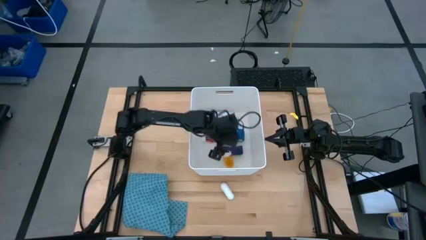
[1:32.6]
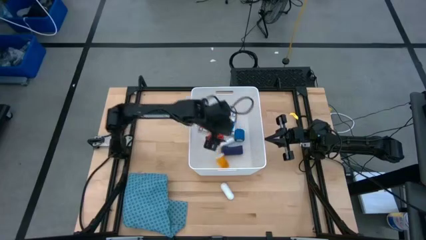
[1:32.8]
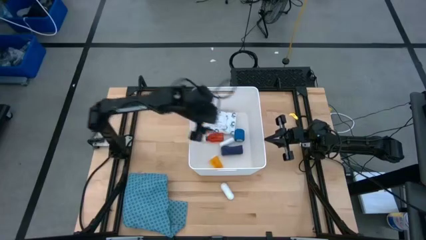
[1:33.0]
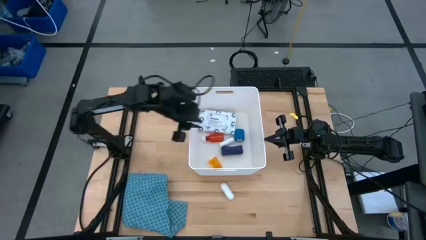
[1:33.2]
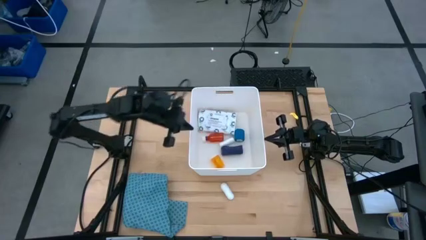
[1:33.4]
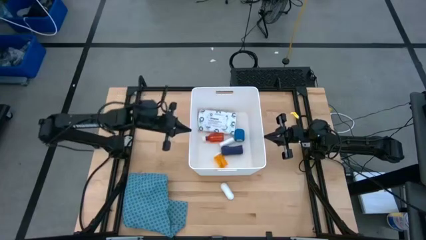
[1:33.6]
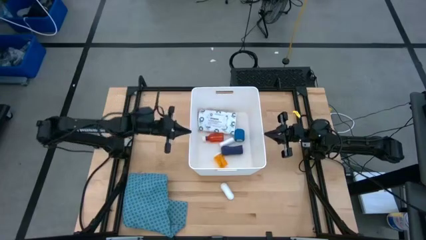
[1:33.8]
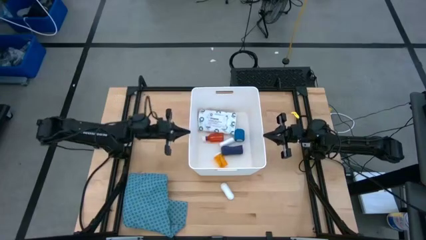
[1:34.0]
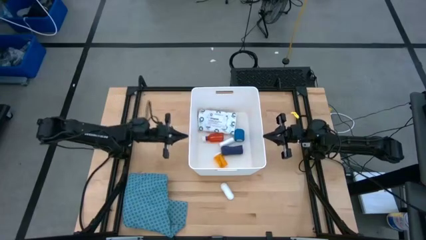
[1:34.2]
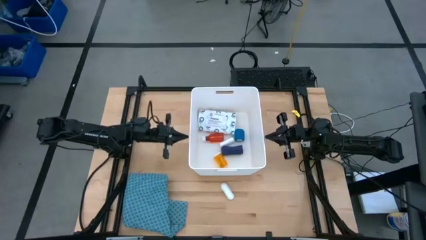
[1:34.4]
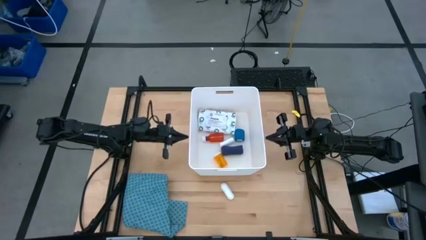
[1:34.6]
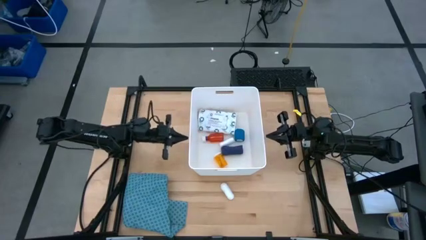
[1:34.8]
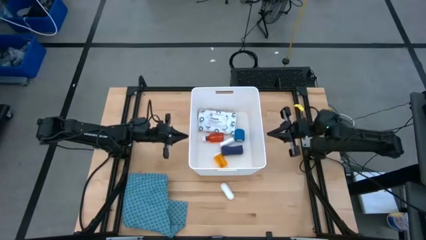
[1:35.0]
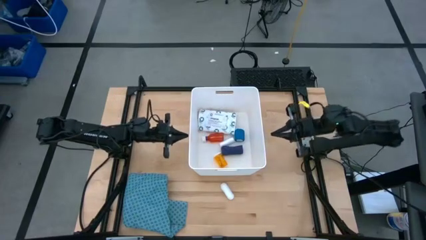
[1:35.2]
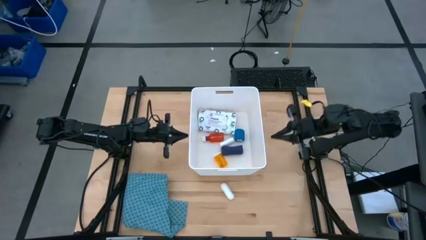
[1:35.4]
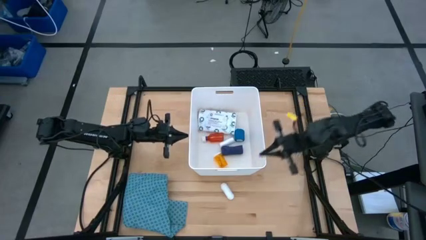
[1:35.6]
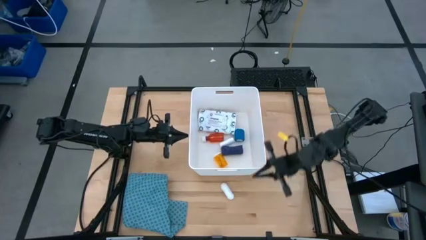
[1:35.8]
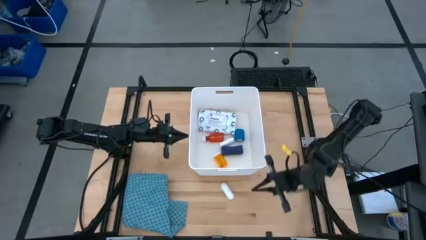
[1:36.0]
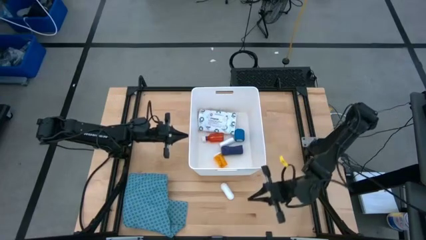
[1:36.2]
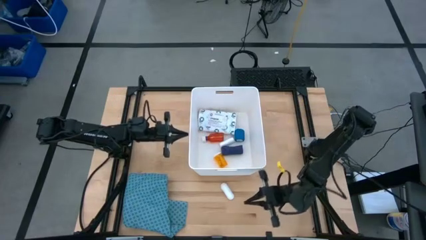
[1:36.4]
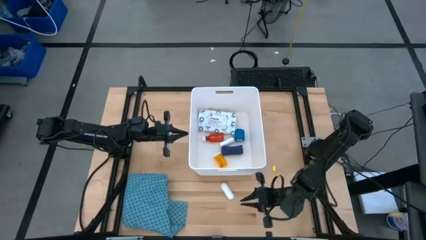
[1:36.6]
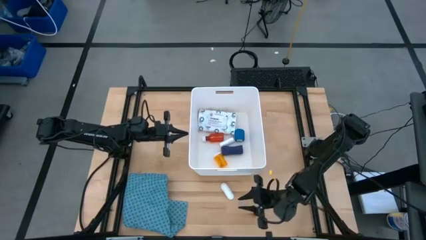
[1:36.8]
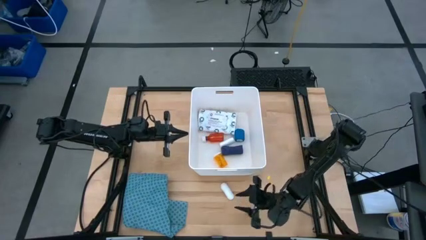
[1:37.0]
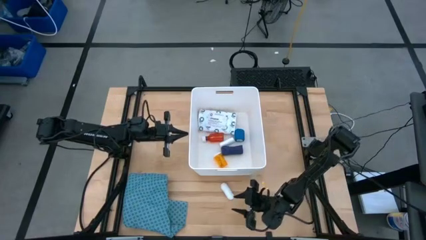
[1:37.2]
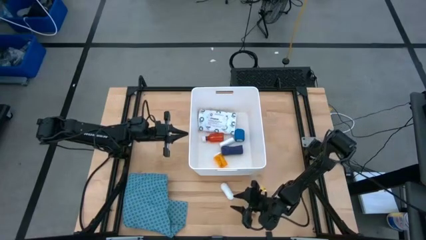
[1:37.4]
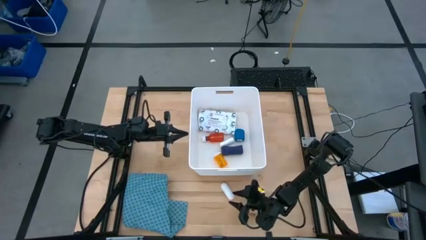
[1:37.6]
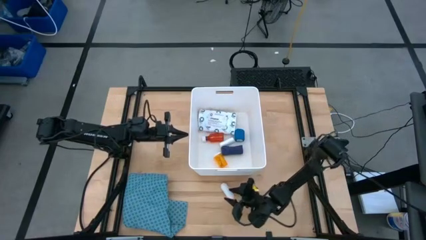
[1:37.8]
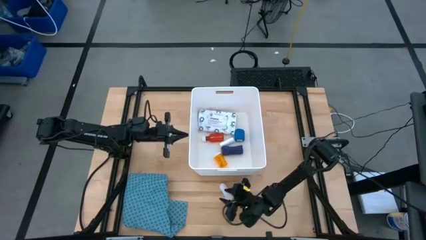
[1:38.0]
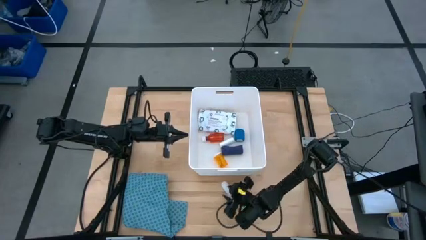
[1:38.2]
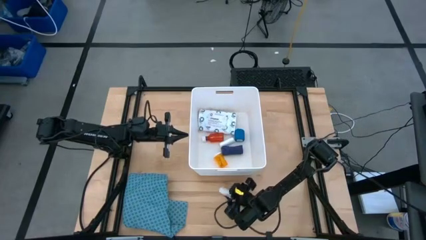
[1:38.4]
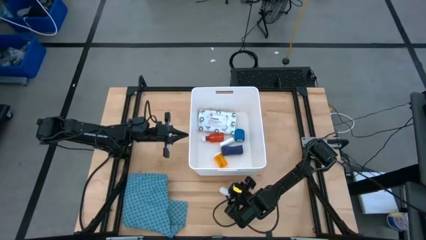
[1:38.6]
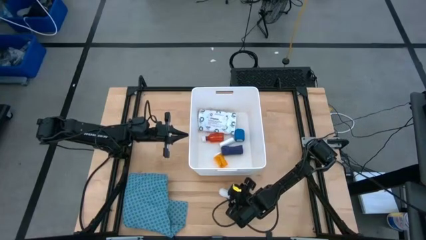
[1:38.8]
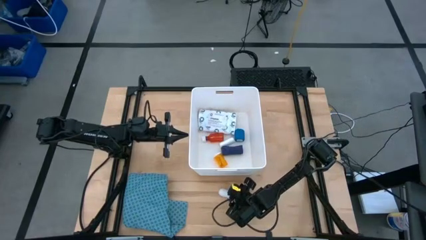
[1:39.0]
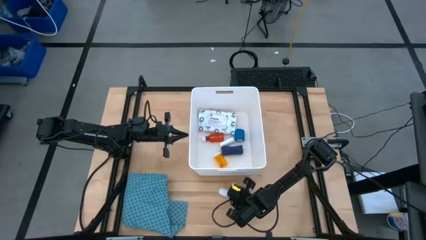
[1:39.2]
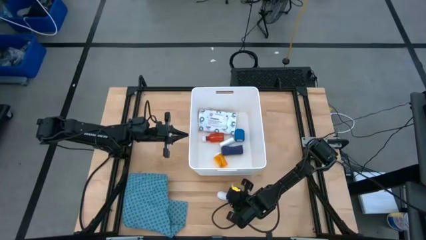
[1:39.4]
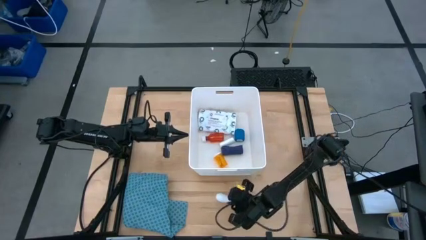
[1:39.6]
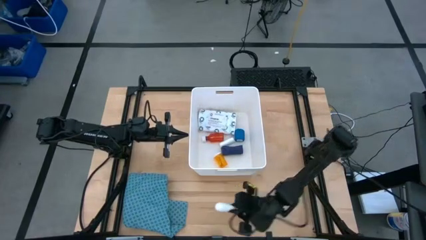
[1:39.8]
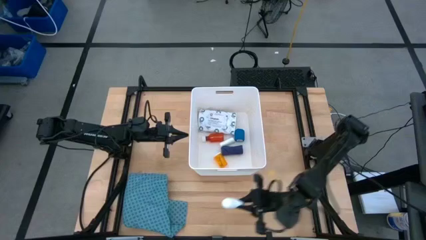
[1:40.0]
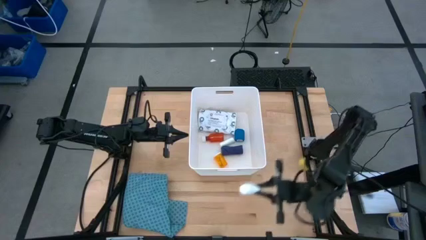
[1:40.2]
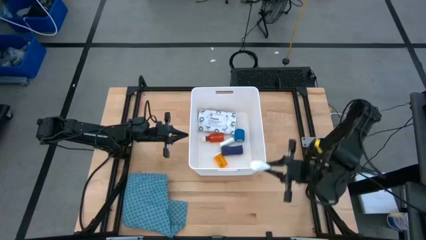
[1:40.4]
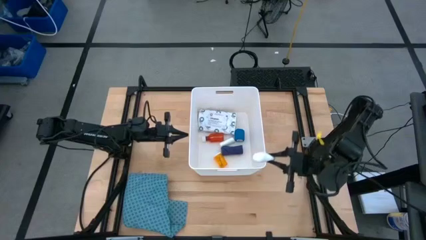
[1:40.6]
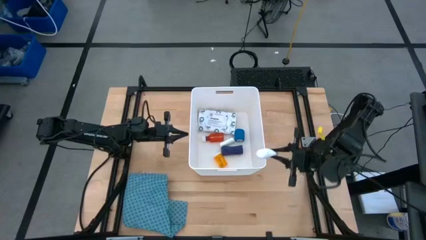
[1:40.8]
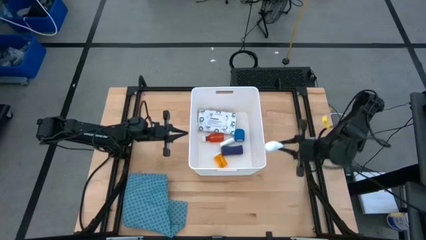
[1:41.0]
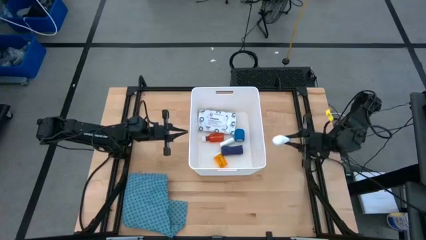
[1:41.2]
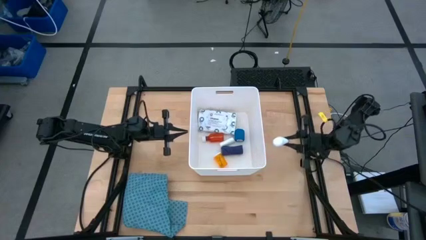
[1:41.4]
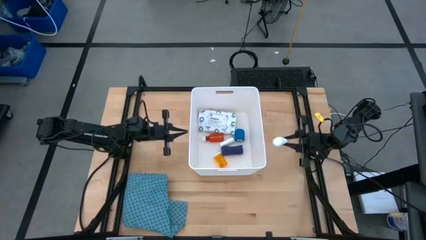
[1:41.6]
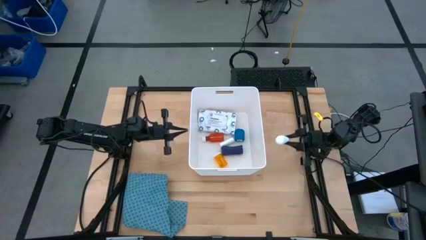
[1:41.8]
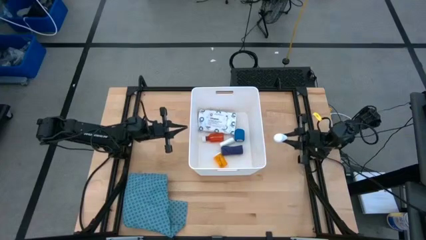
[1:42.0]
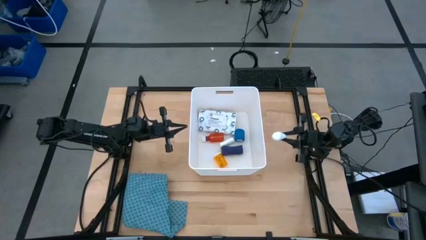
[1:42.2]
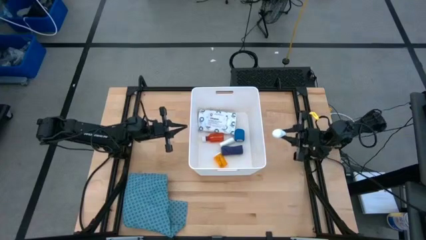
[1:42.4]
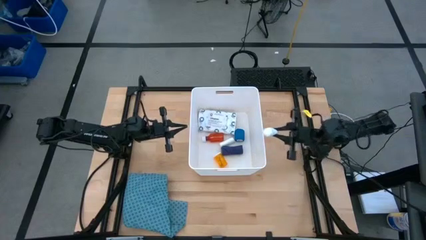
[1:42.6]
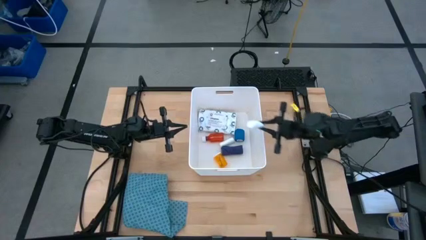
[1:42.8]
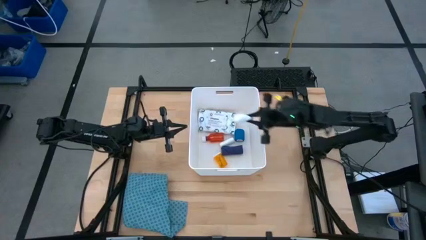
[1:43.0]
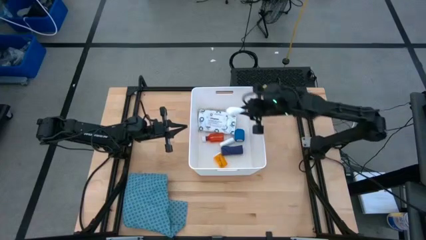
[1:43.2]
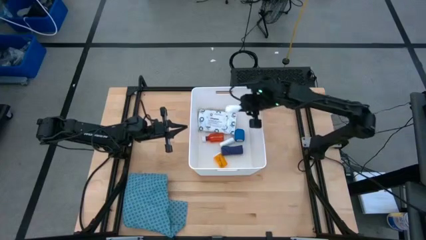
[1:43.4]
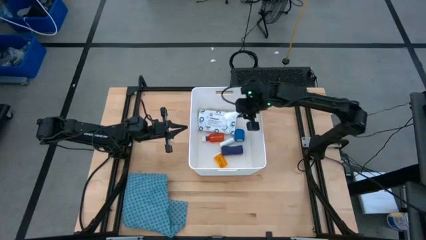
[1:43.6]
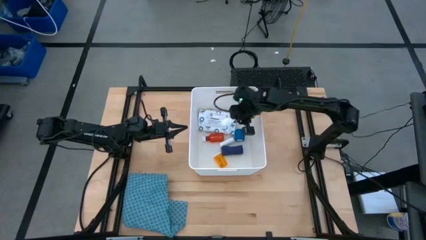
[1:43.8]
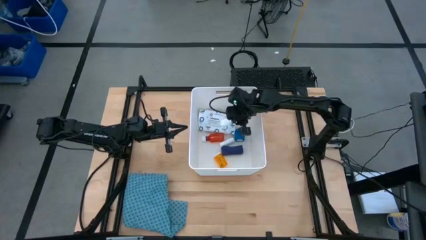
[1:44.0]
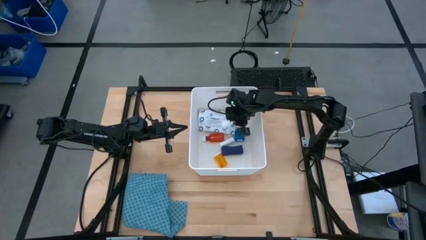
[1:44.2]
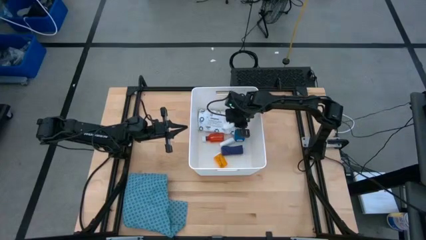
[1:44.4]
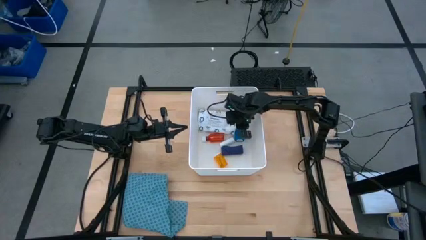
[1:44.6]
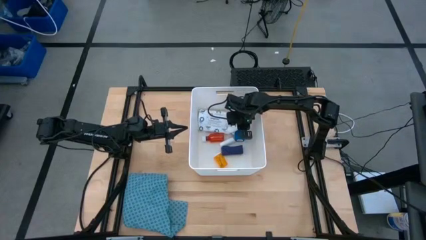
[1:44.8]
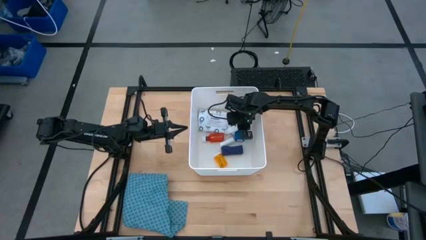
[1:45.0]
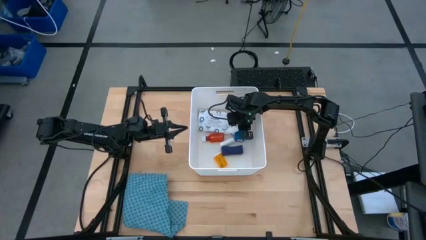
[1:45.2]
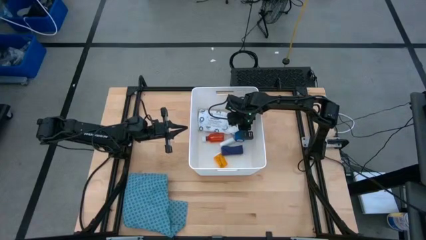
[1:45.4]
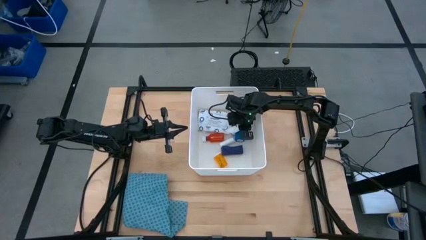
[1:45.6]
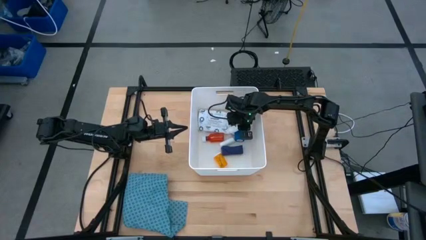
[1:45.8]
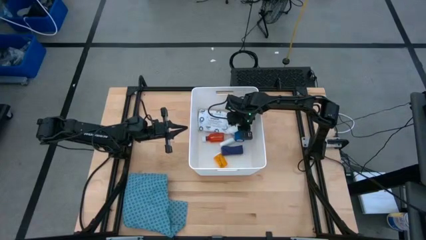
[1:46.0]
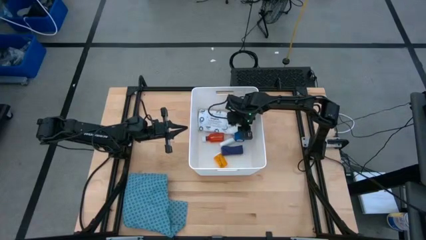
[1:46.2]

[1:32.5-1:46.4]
Task: Pick & place medical supplies in basket/bin
Put the white rolled gauze into the white bin

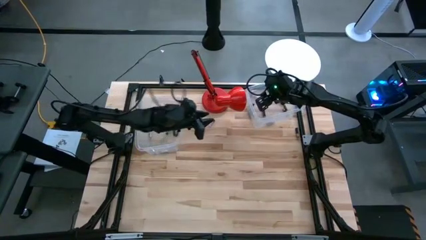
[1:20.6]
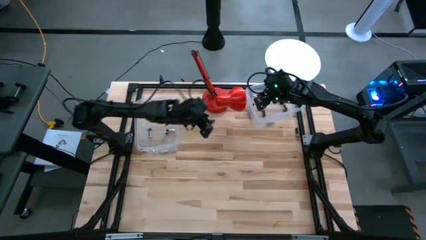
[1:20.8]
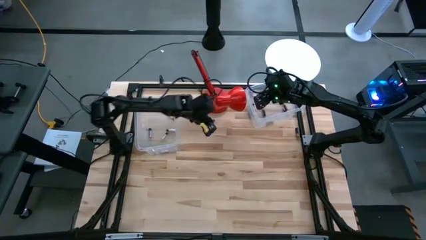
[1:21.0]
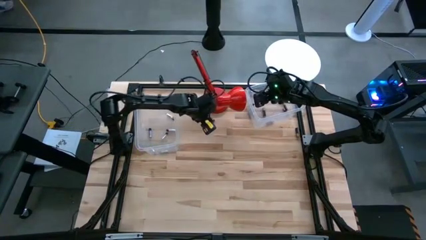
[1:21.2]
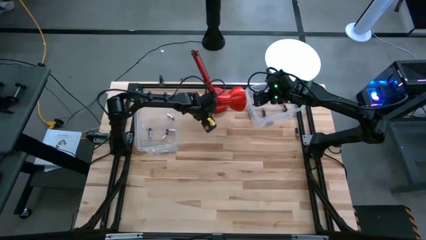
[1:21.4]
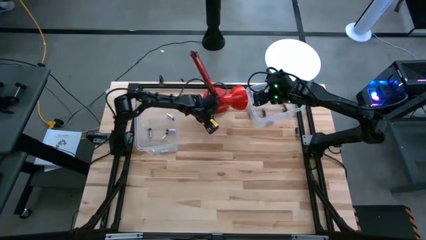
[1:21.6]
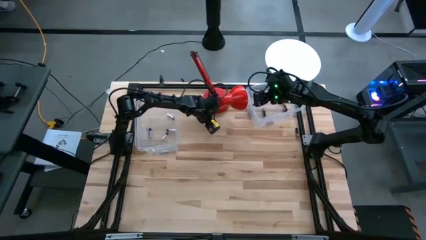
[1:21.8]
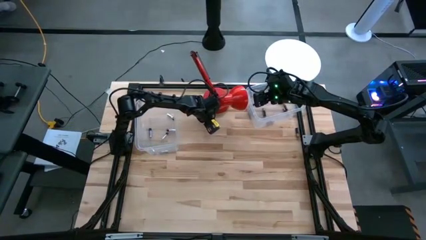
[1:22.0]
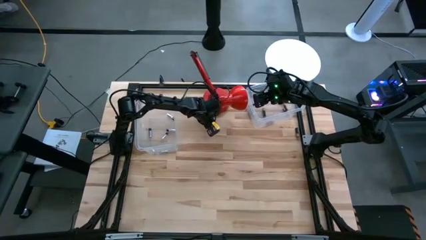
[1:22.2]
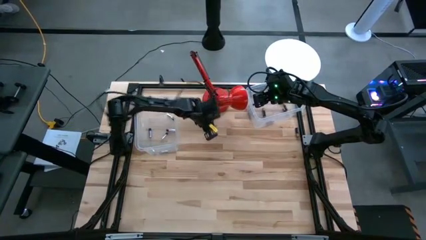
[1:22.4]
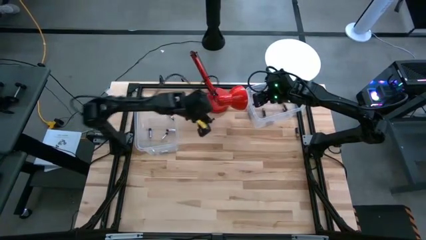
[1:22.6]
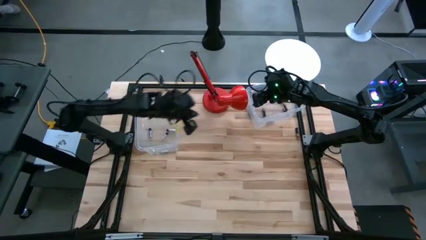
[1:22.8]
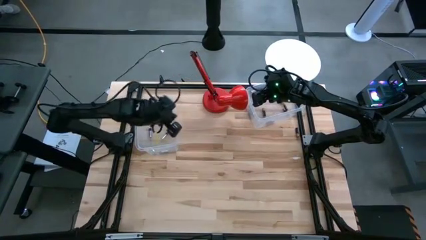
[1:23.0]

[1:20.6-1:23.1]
Task: Sort batteries
Put the silver battery into the left transparent bin
